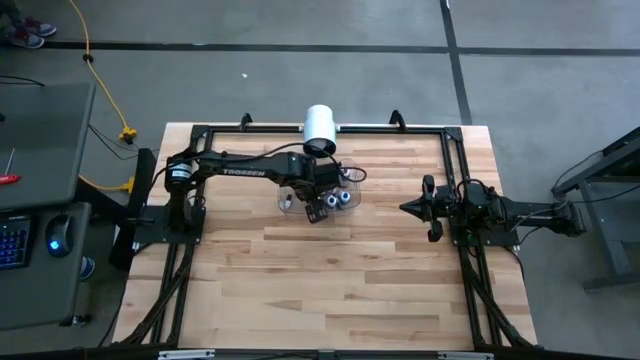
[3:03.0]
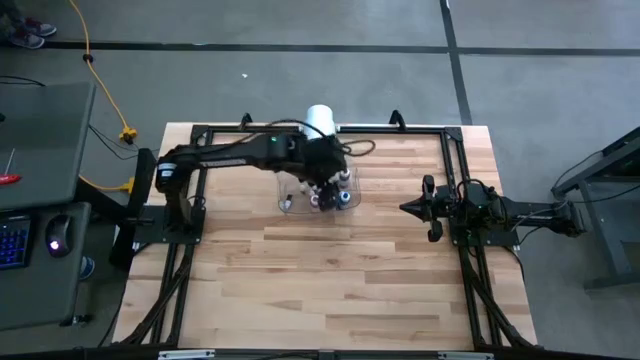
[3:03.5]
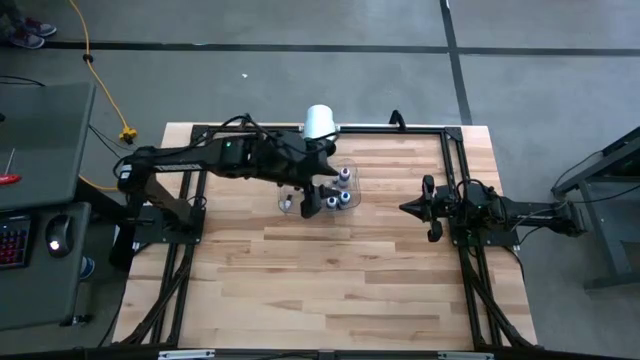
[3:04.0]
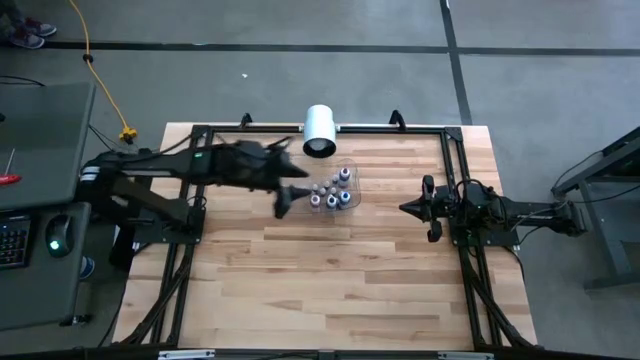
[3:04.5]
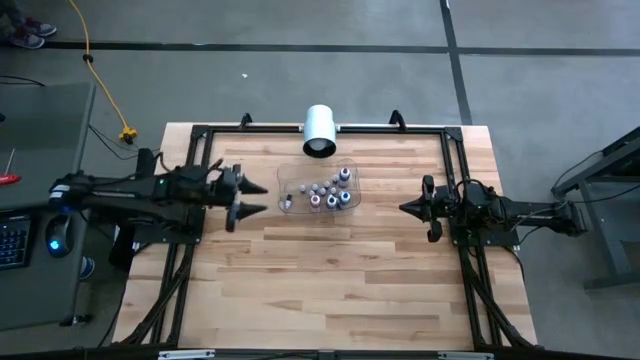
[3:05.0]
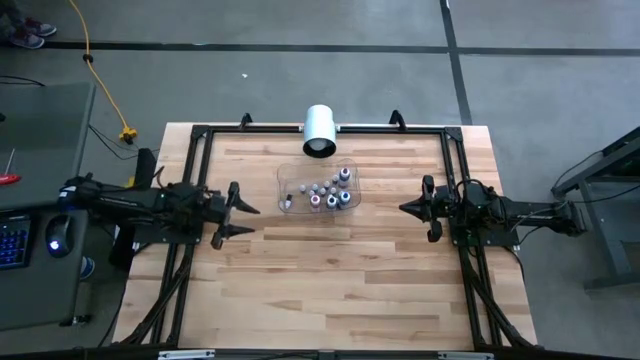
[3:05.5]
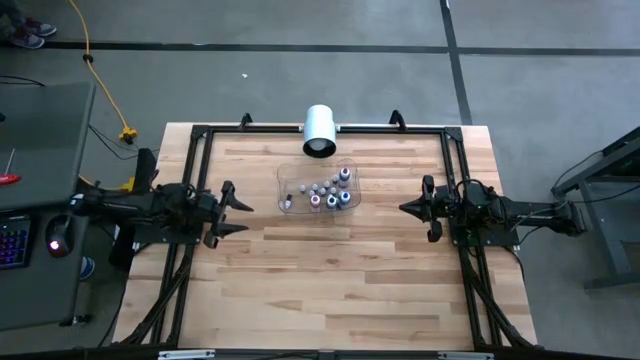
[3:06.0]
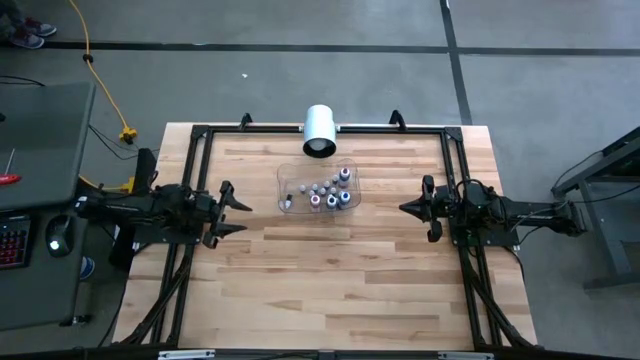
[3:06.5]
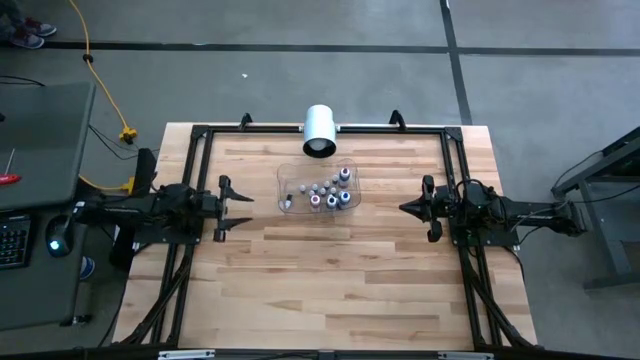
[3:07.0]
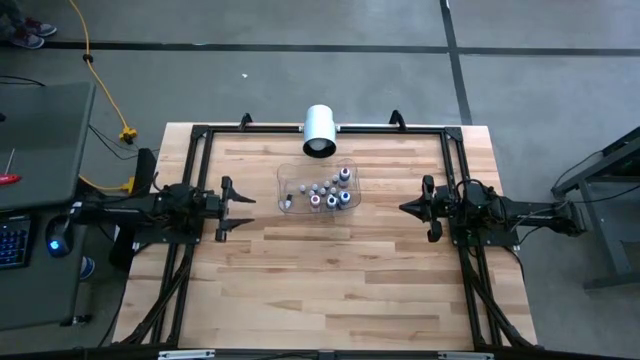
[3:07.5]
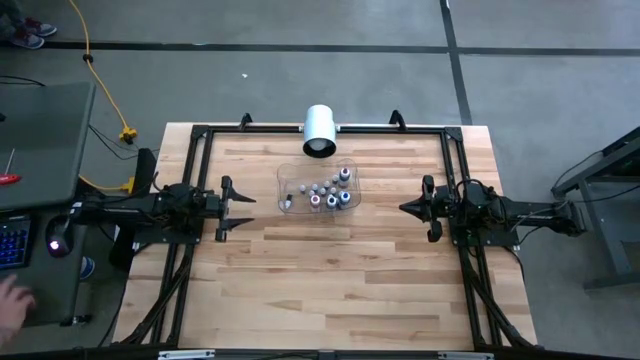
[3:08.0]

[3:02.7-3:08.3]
Task: Pick & Place food coloring
Return to Home Position

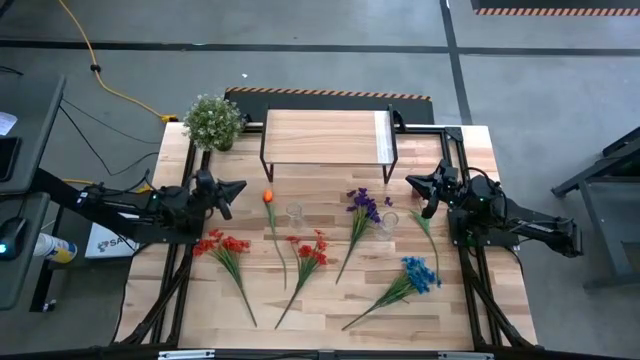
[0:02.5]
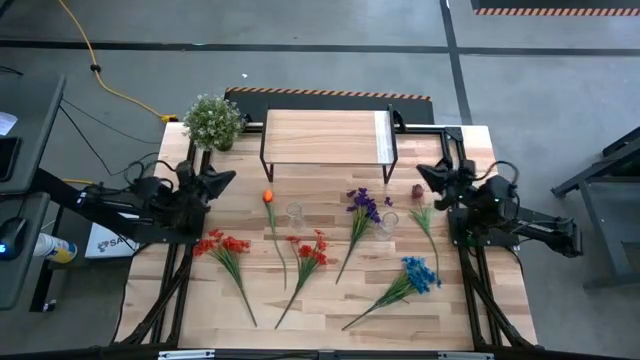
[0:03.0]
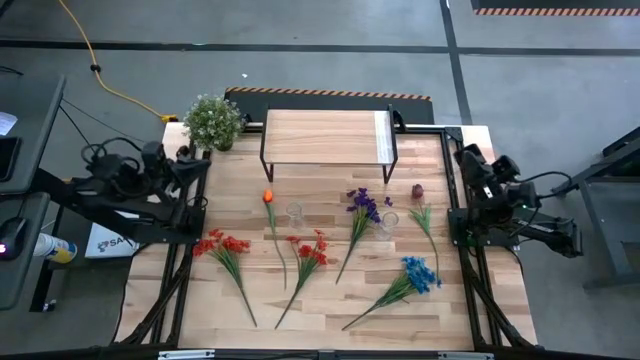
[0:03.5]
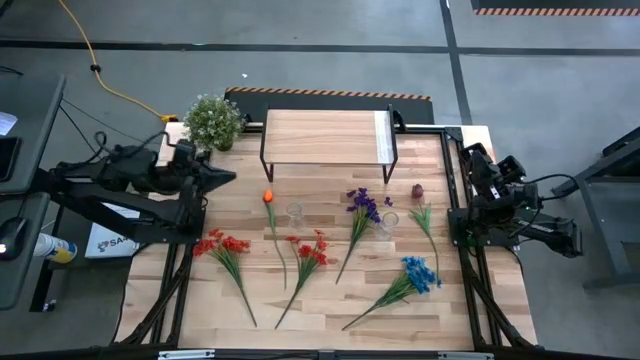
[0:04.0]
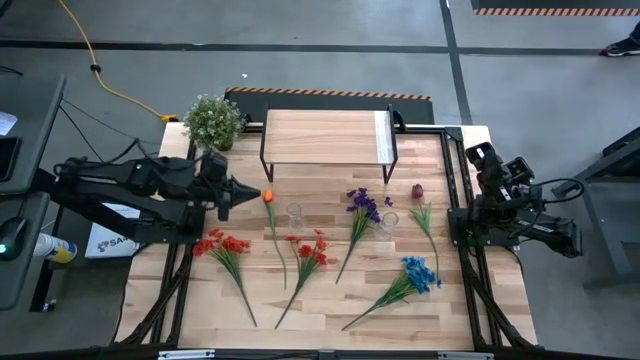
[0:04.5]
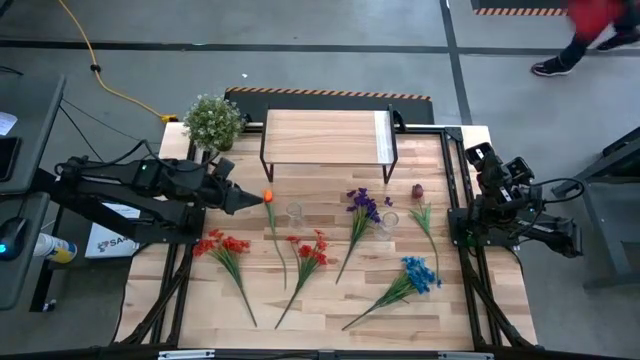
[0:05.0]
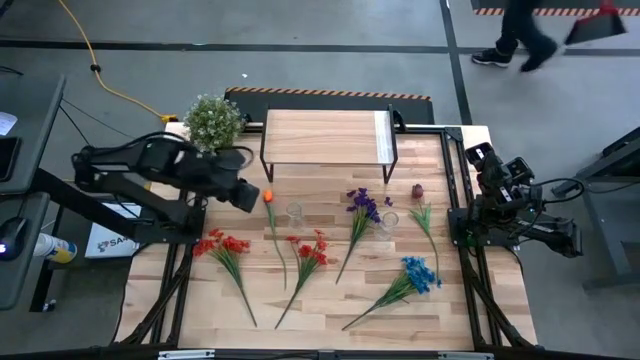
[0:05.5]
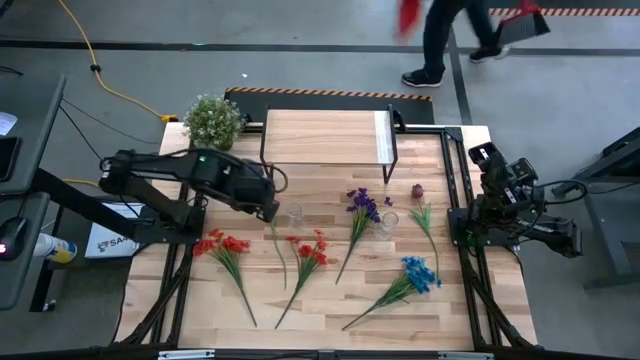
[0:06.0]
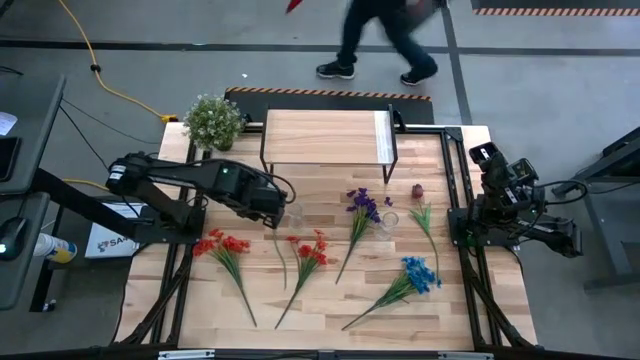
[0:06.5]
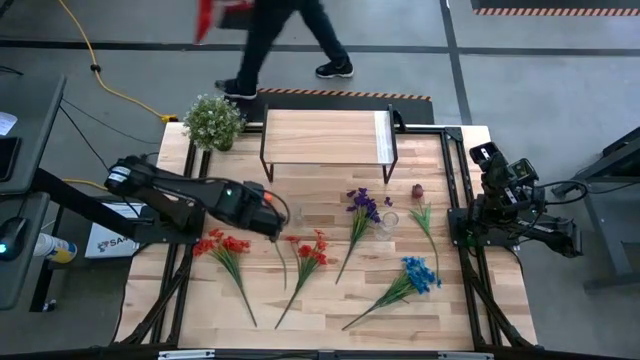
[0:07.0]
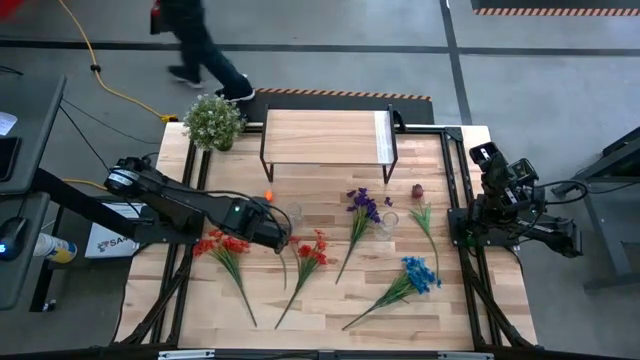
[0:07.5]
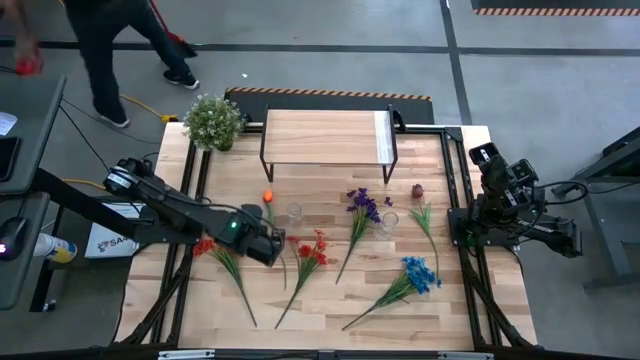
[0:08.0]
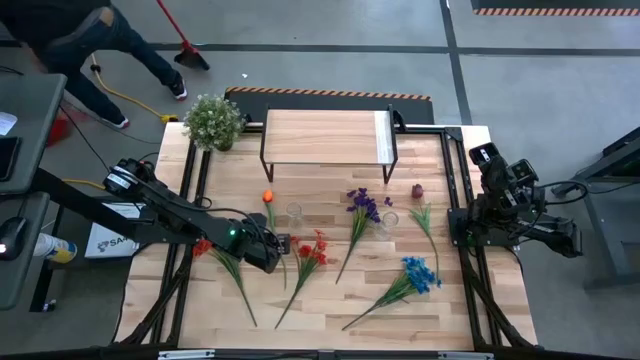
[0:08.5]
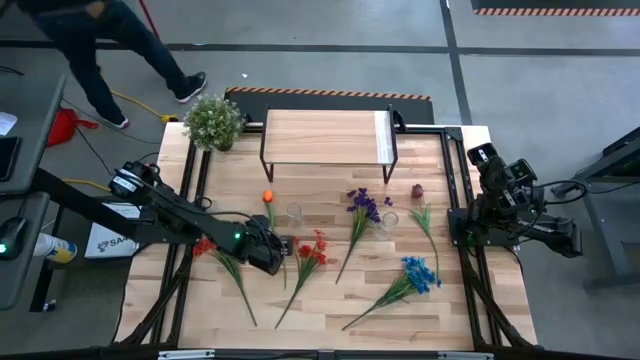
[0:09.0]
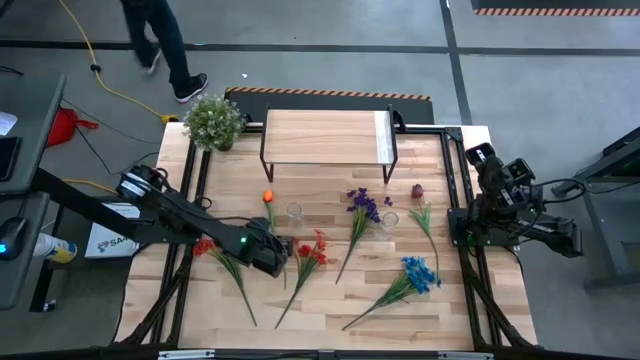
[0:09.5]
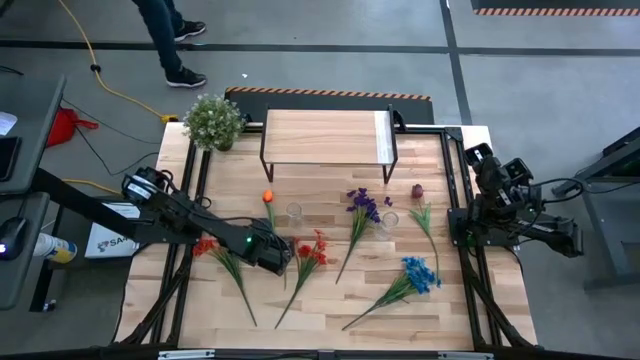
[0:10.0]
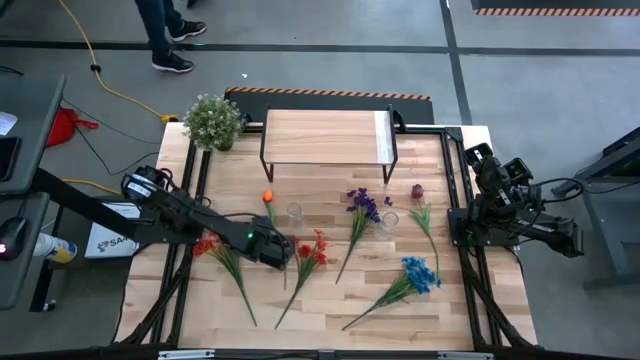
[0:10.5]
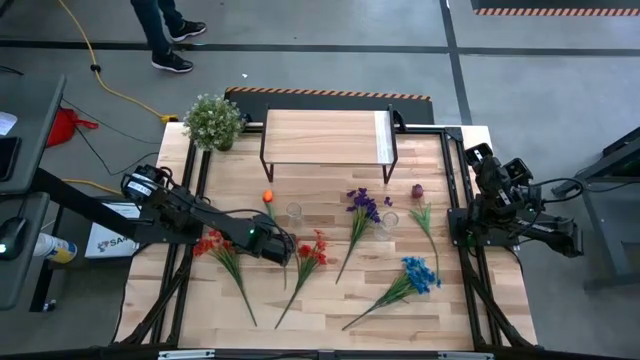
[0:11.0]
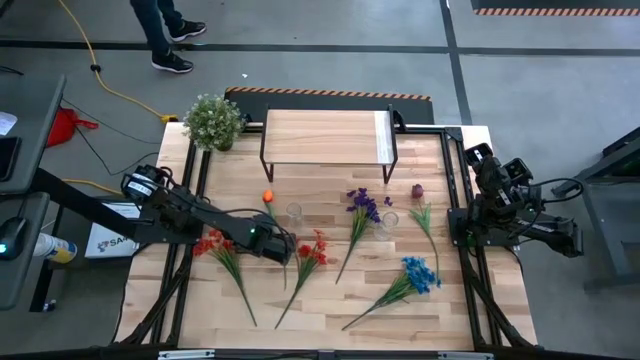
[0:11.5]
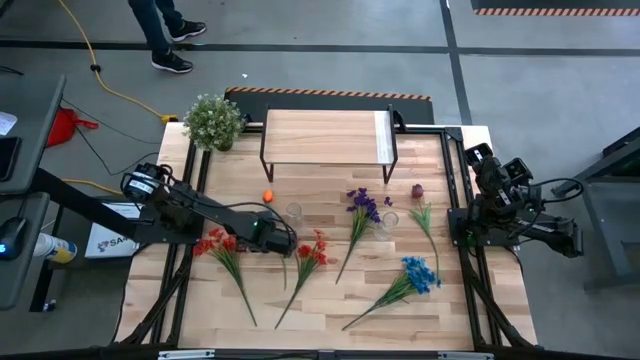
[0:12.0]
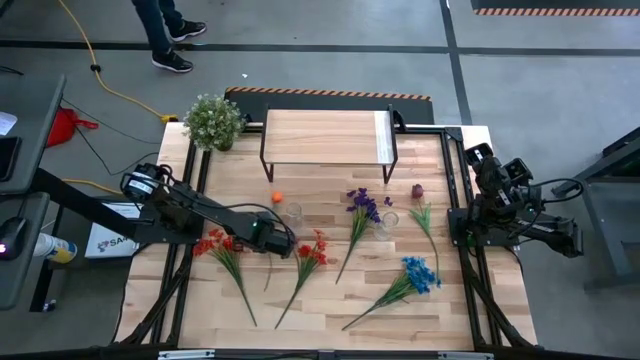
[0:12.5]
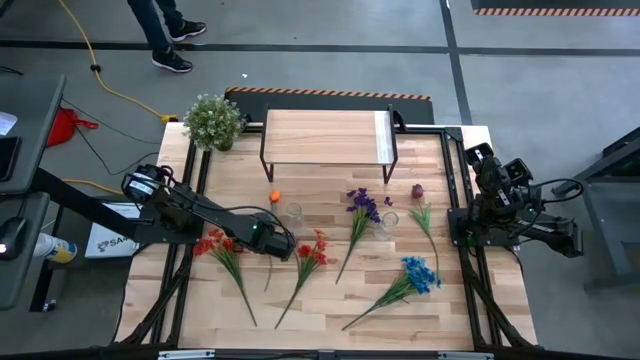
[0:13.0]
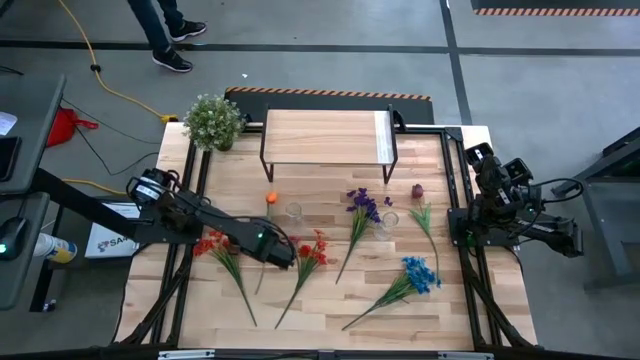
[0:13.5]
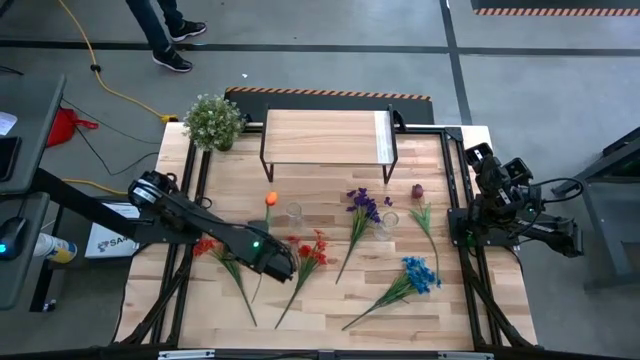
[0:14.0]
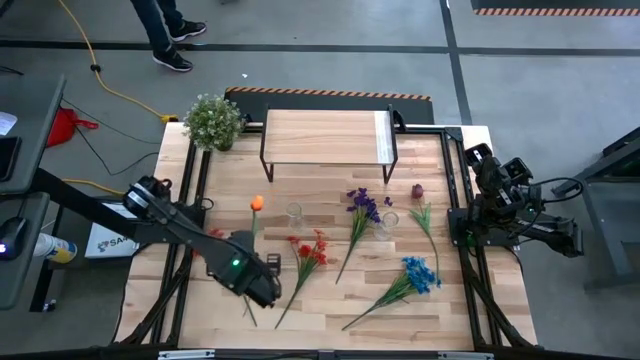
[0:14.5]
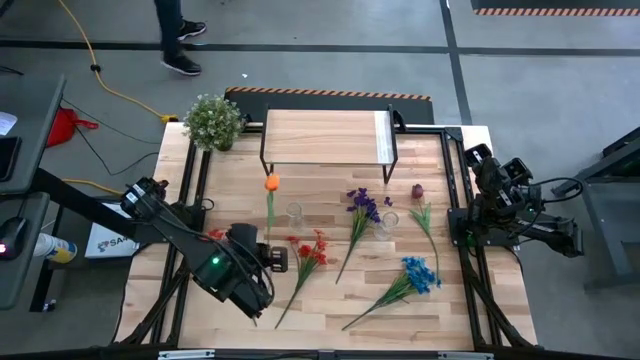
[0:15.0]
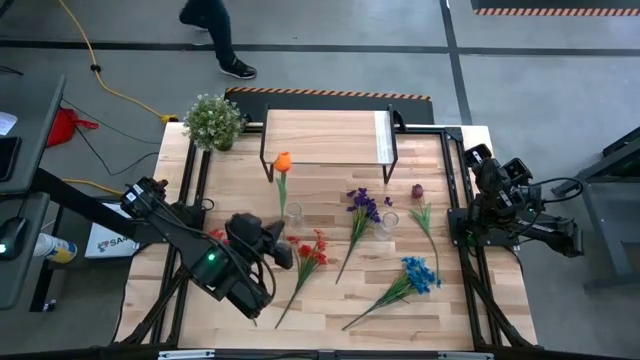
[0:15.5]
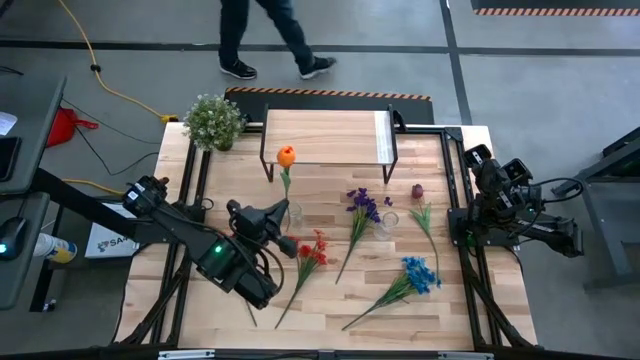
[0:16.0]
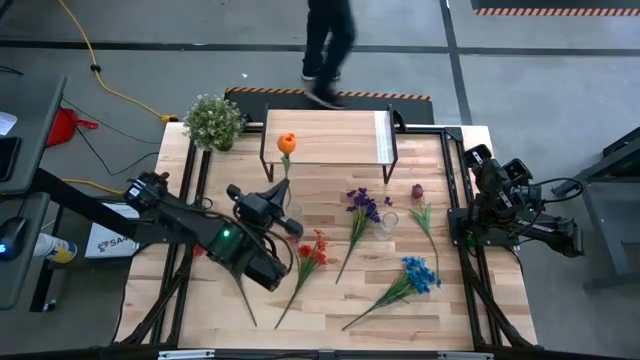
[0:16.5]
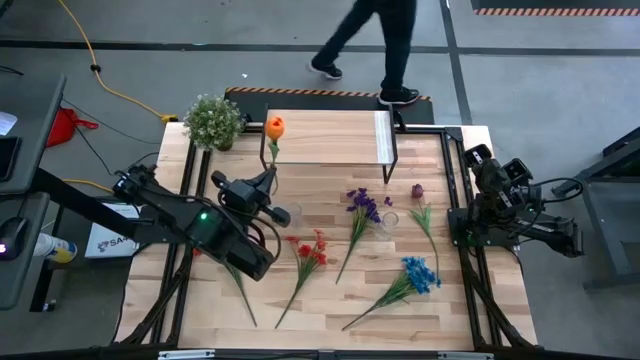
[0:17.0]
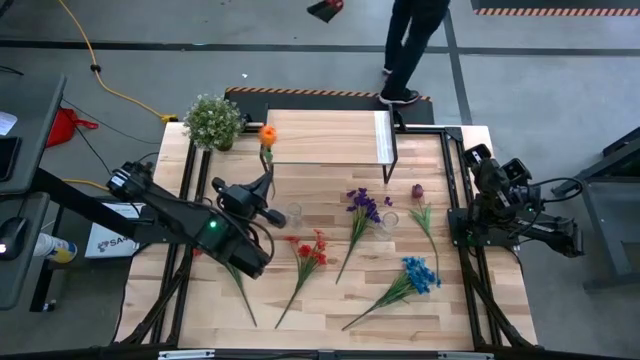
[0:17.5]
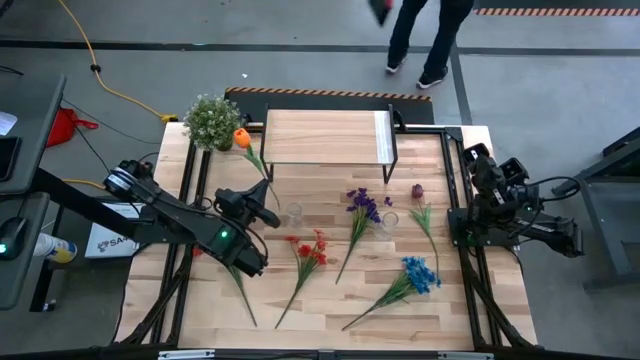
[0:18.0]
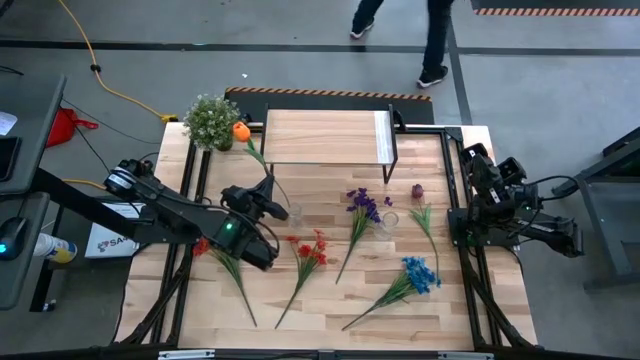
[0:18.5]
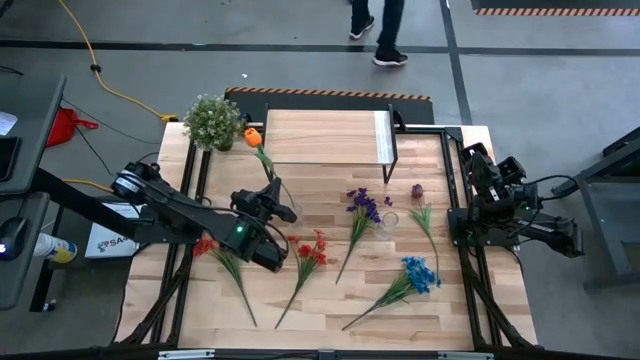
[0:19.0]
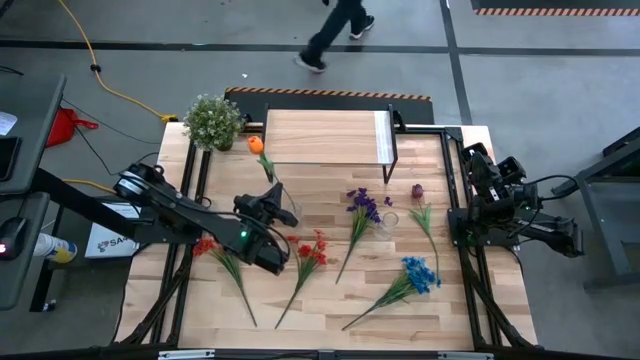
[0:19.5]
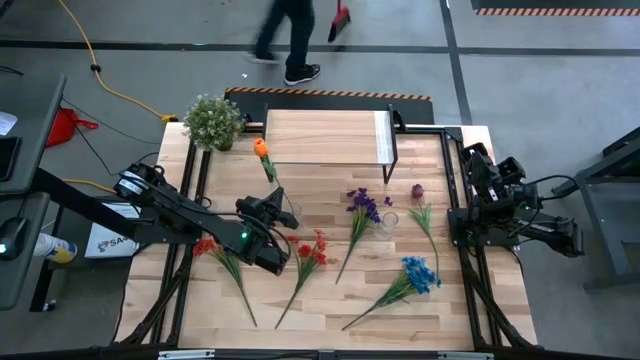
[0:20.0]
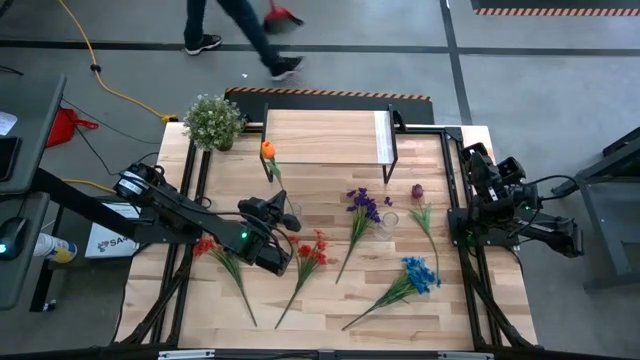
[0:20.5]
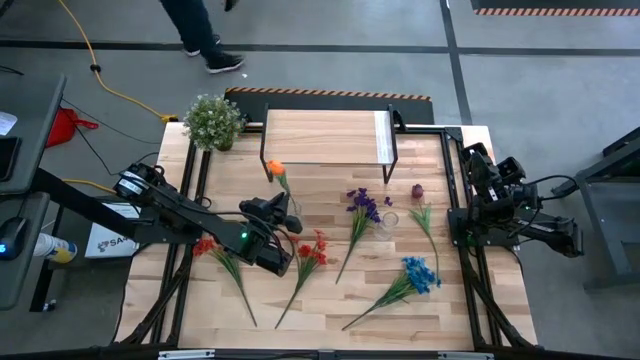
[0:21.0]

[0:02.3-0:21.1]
Task: Pick and place flowers into a vace then onto a shelf
Put the orange tulip into the left transparent vase
